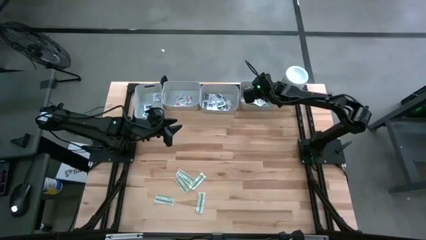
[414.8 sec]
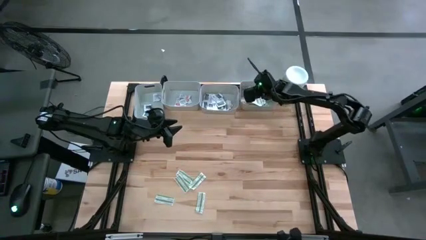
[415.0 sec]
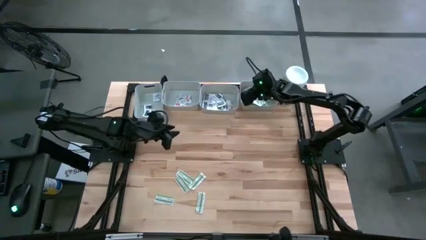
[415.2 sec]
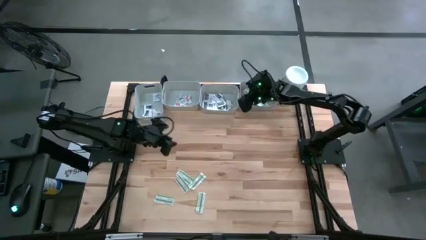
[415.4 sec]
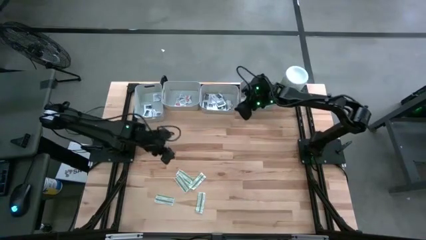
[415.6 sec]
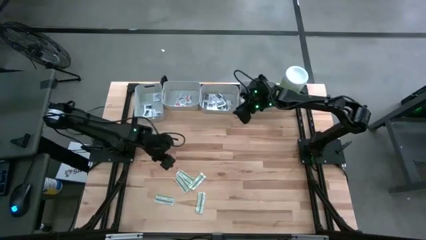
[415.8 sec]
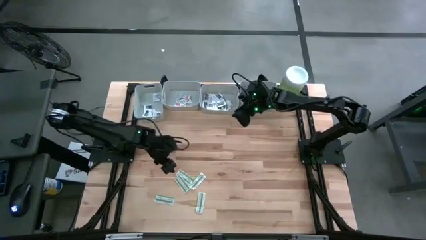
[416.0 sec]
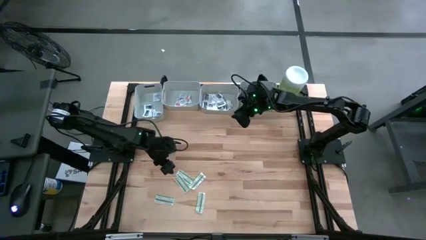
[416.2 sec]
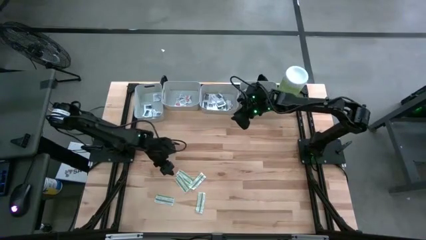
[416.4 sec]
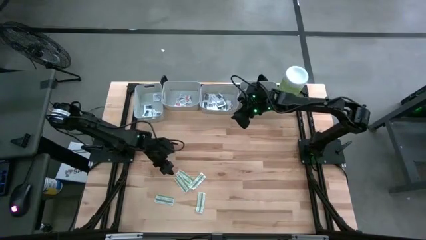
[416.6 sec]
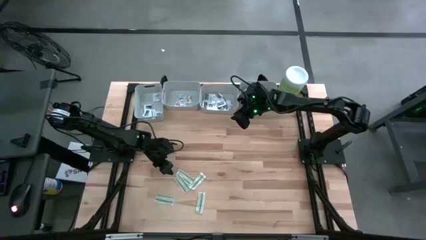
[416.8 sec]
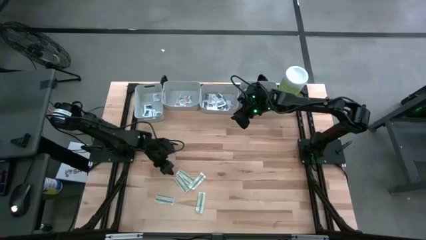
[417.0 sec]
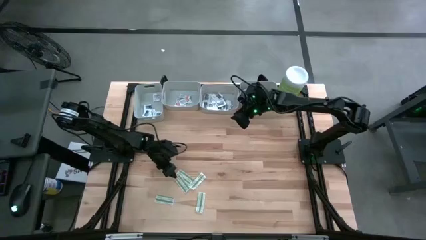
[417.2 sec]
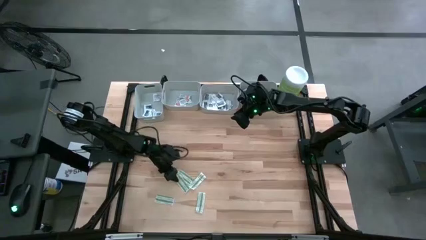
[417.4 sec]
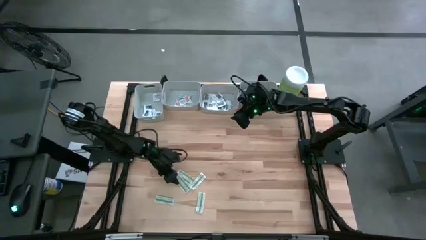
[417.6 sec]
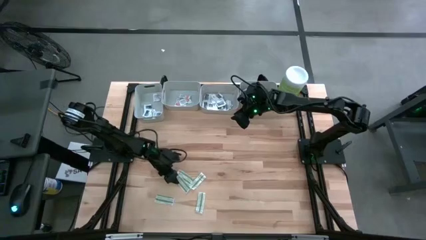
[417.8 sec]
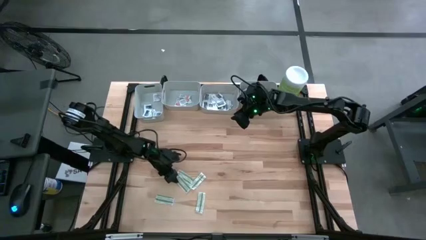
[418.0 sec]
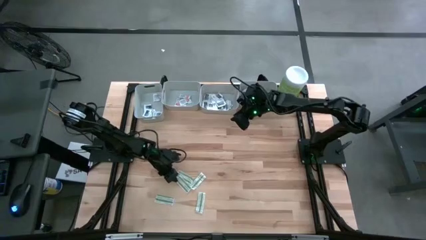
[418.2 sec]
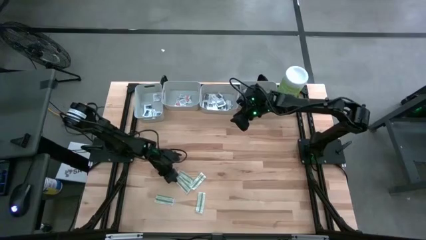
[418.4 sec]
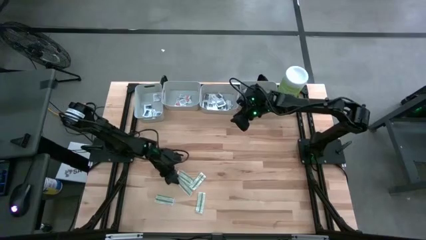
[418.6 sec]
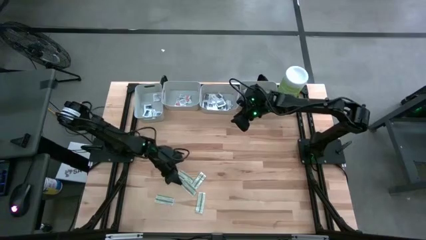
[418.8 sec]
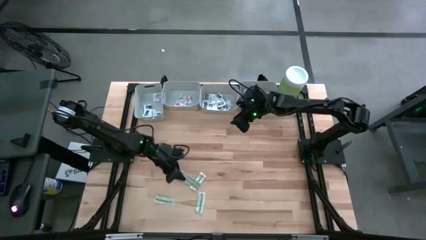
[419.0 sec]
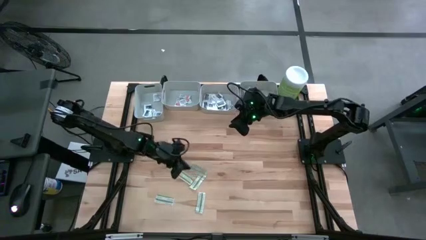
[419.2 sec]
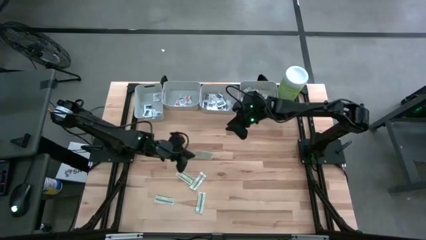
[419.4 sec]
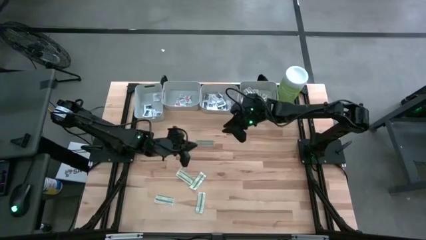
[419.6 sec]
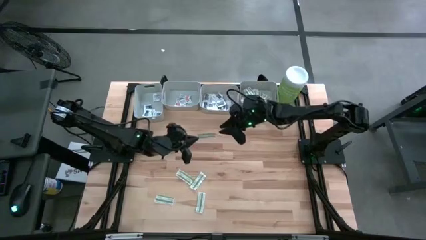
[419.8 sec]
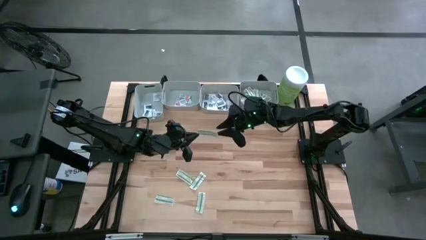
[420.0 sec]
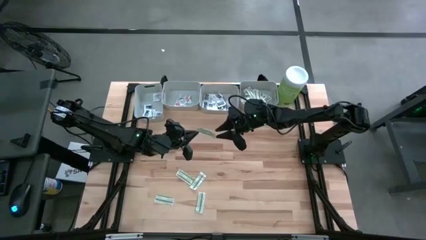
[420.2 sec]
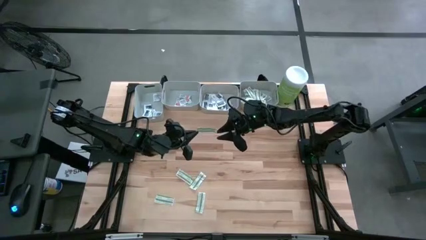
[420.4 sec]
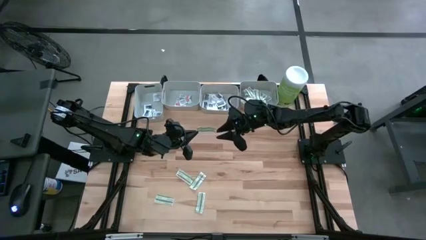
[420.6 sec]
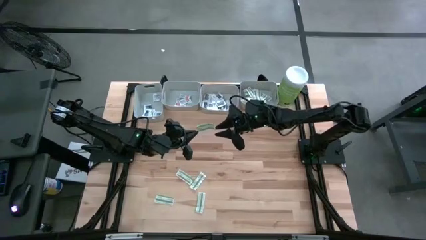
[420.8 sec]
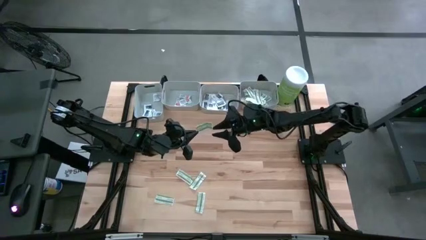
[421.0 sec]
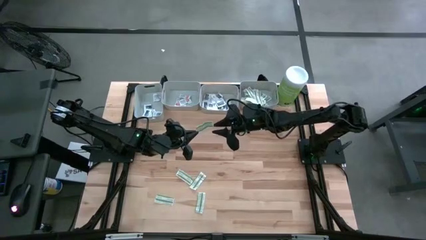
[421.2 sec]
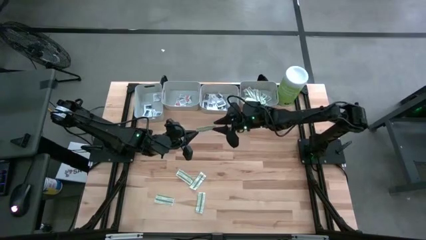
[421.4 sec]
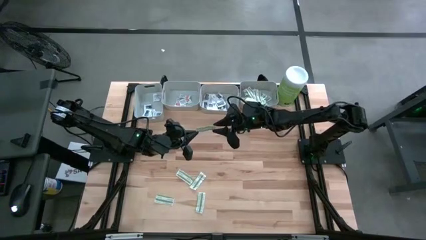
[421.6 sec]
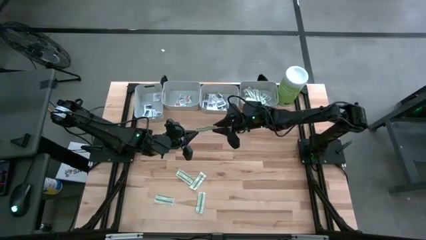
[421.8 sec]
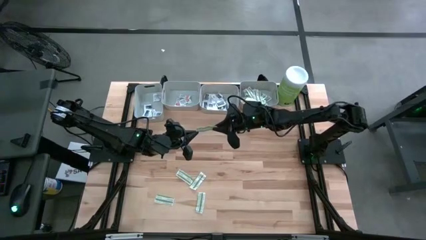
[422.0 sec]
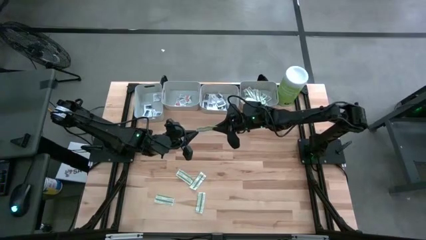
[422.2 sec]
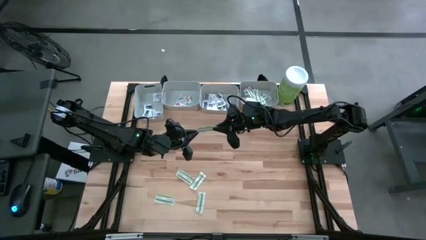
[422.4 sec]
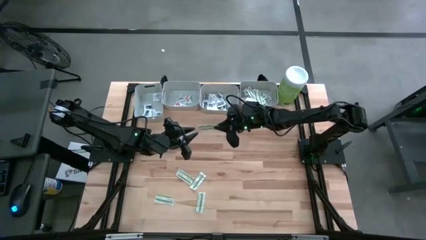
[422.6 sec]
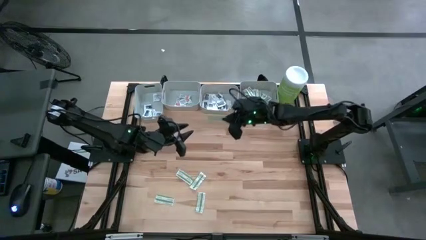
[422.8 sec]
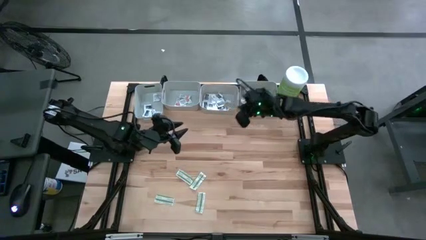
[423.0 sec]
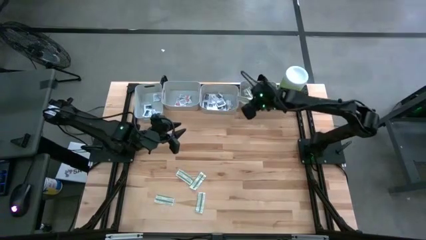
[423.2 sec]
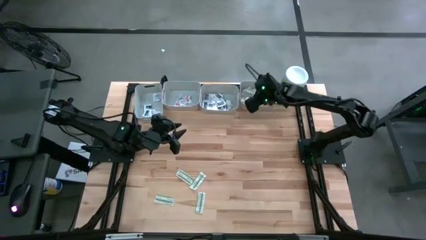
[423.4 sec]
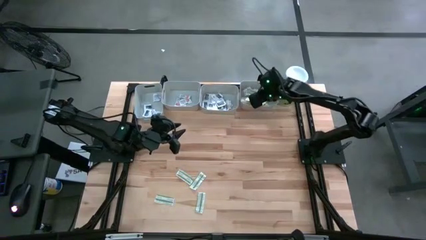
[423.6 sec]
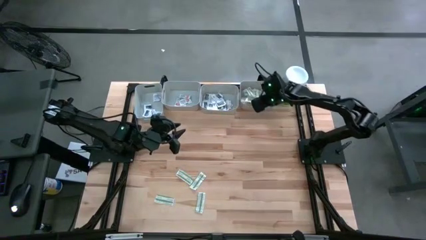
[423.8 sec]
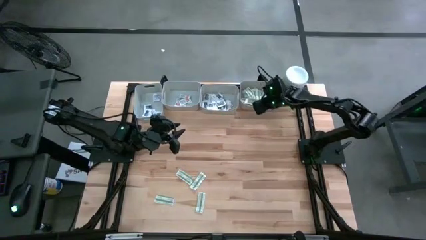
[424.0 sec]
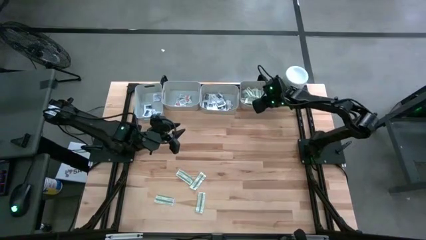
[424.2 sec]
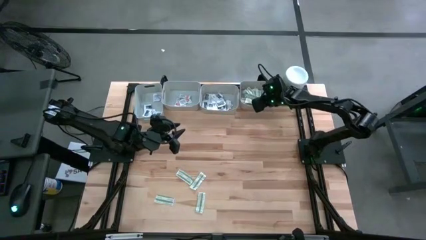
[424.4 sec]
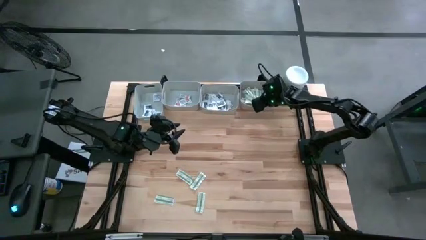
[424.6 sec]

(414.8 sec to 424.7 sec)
Task: Pick & Place First Aid Supplies
Put the green bandage into the right gray bin

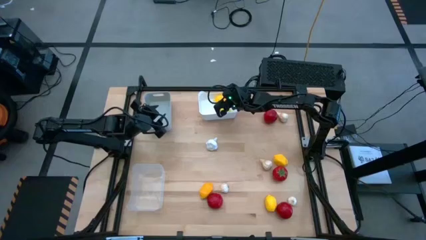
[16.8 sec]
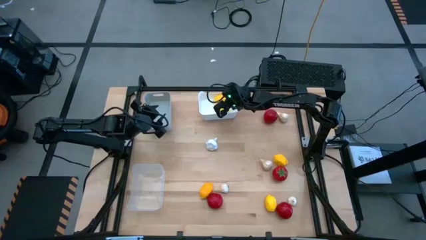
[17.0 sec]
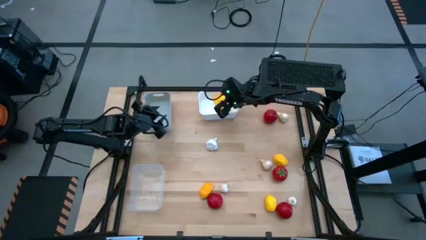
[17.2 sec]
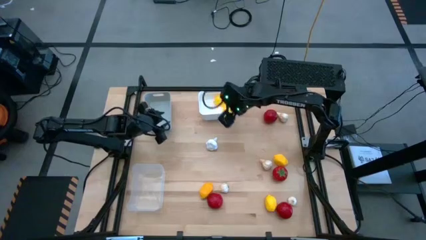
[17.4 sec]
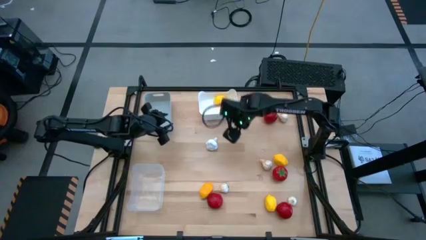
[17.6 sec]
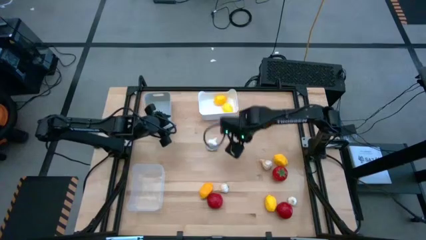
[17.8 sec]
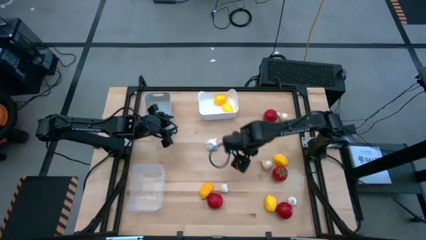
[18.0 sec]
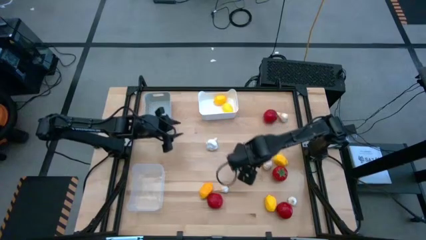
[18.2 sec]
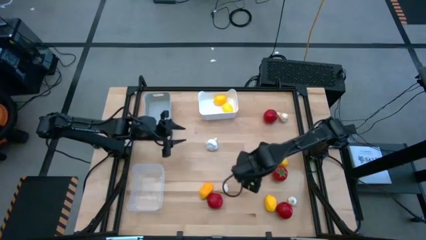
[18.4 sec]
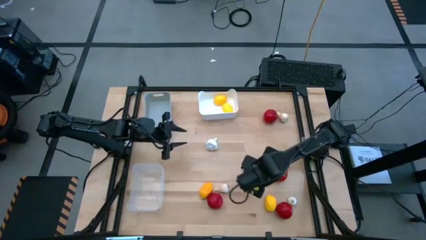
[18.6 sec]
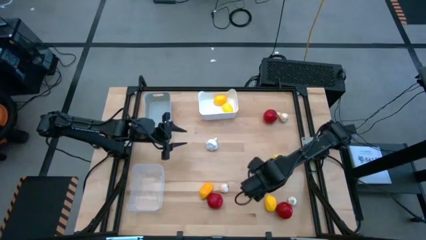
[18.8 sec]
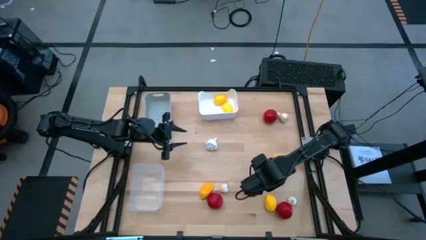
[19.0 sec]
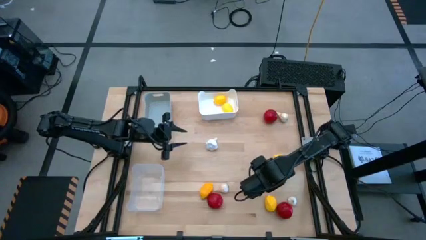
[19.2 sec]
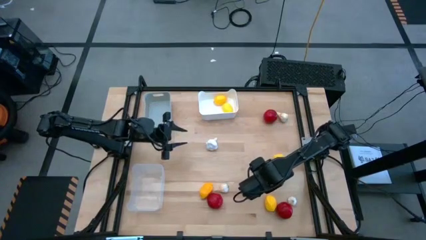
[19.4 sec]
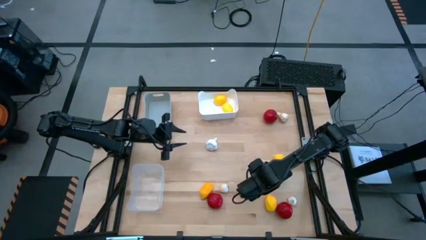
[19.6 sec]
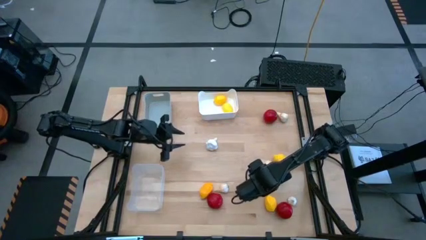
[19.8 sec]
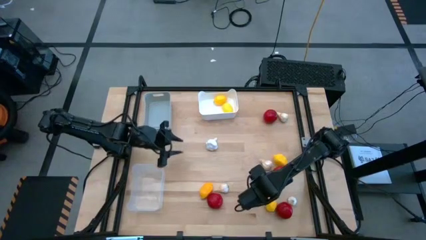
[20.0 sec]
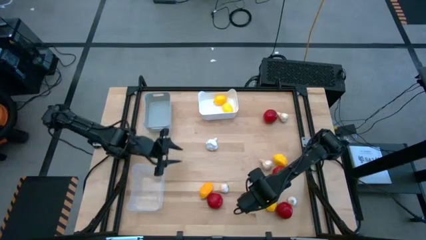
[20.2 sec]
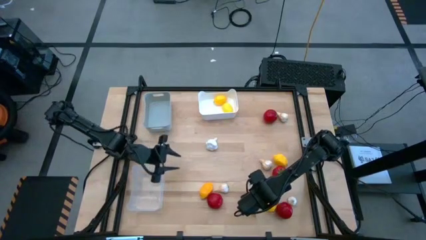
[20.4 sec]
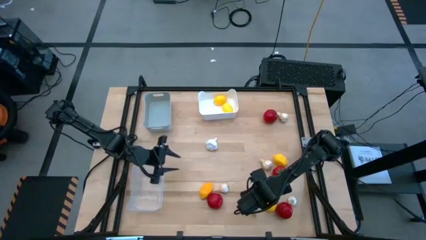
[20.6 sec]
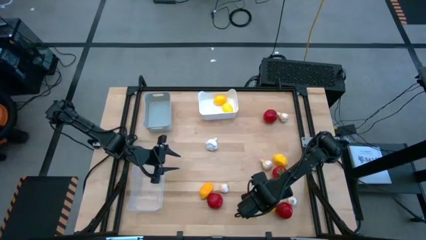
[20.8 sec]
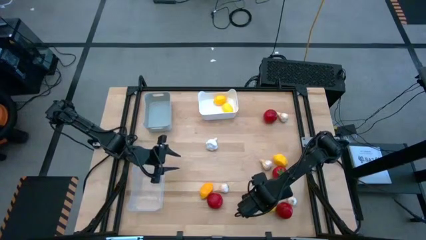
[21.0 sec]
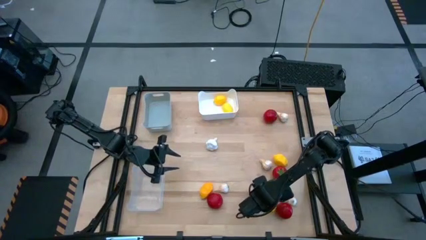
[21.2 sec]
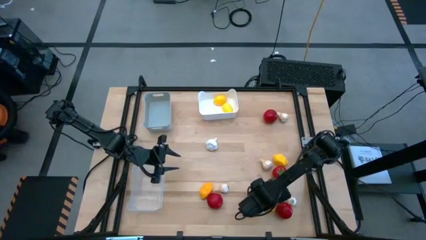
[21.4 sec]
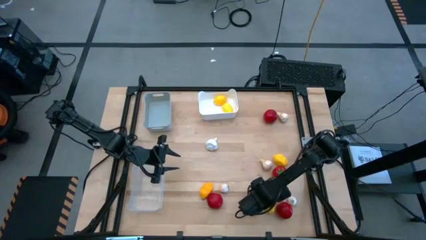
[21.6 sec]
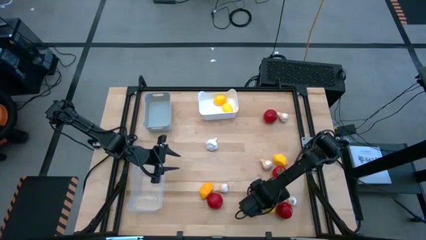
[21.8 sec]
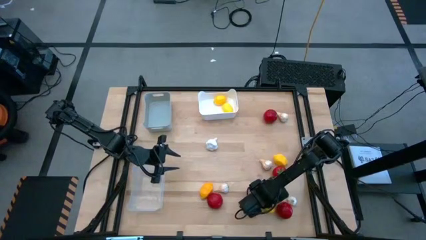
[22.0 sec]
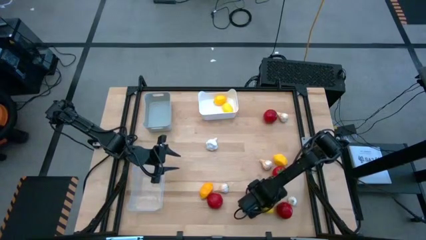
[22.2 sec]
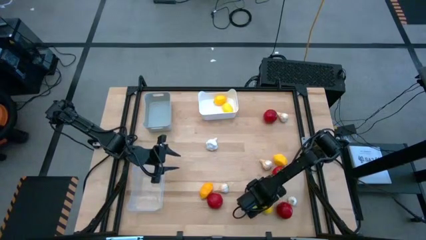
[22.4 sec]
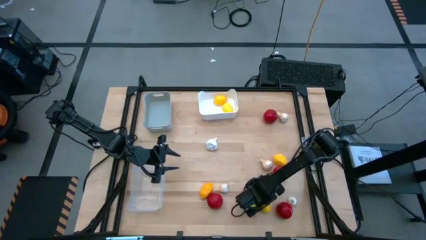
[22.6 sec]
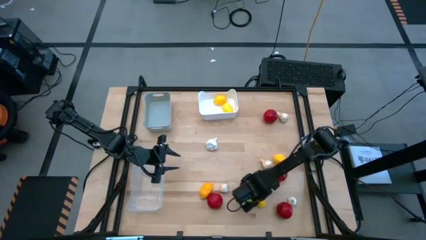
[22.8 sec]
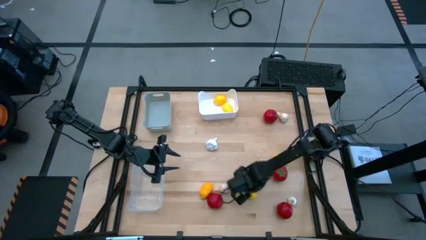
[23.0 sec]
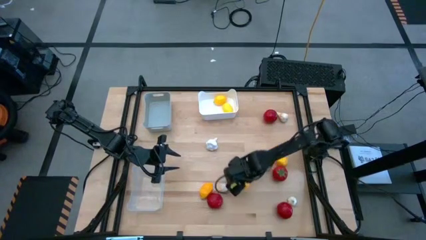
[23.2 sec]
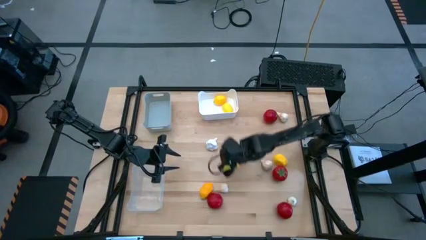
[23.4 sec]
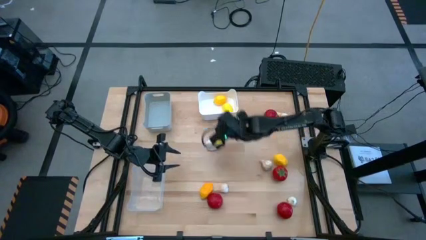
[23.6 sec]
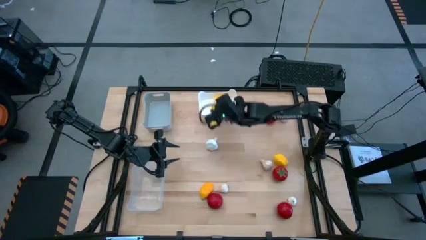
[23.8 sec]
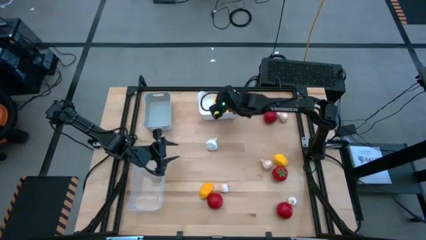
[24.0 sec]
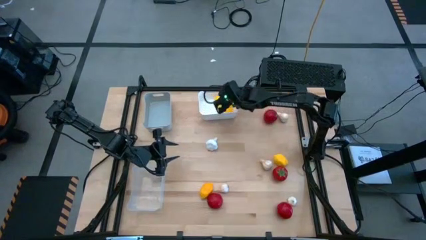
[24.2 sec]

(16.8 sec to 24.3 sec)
Task: Sort produce into baskets
Put the lemon into the white bin
